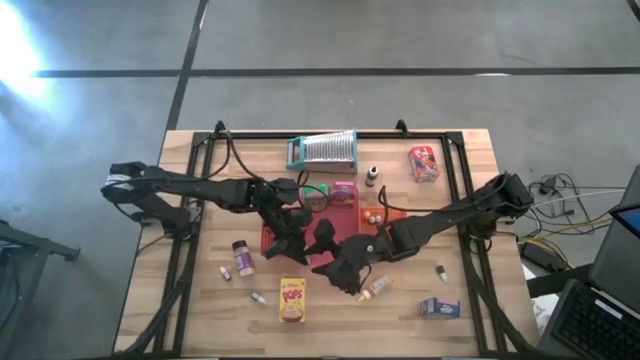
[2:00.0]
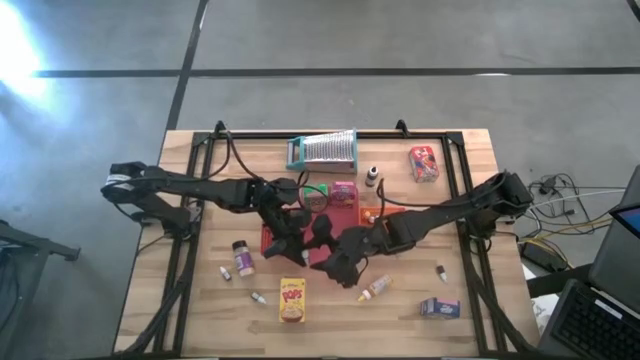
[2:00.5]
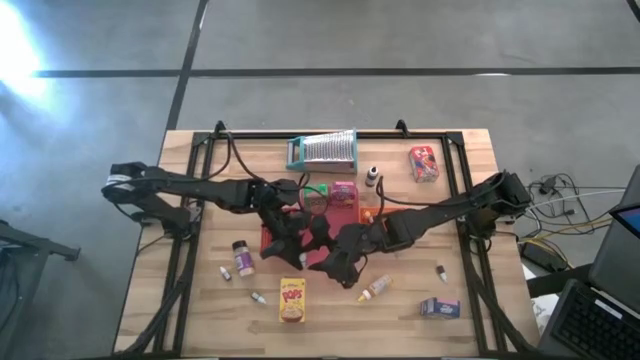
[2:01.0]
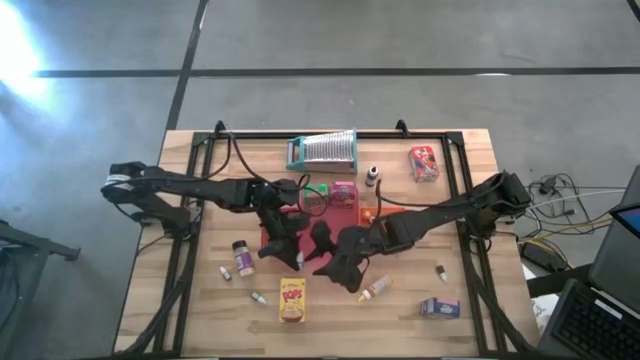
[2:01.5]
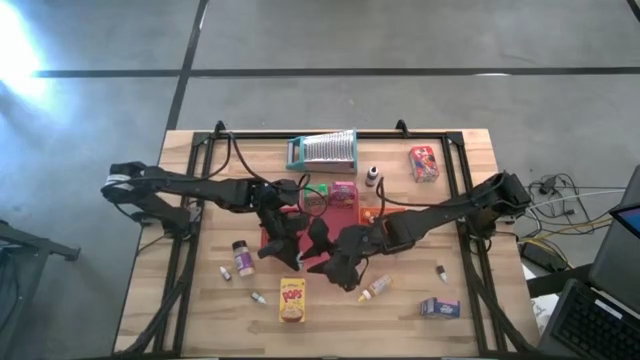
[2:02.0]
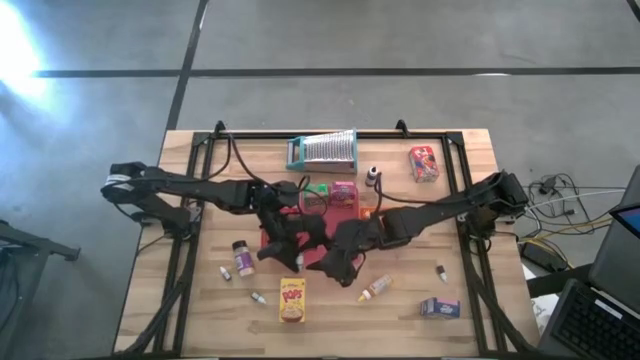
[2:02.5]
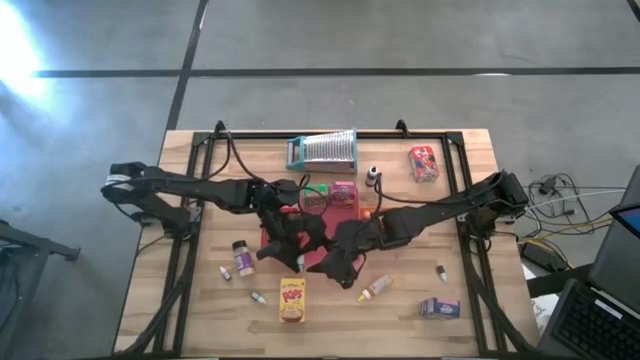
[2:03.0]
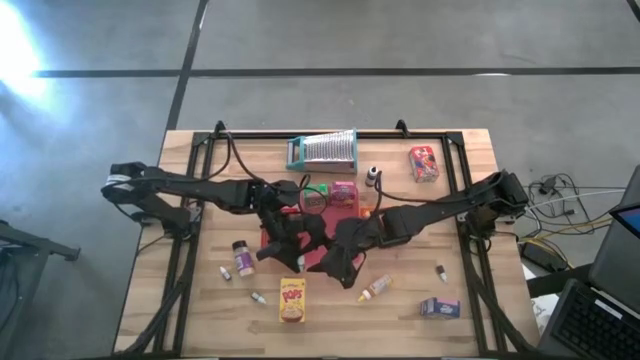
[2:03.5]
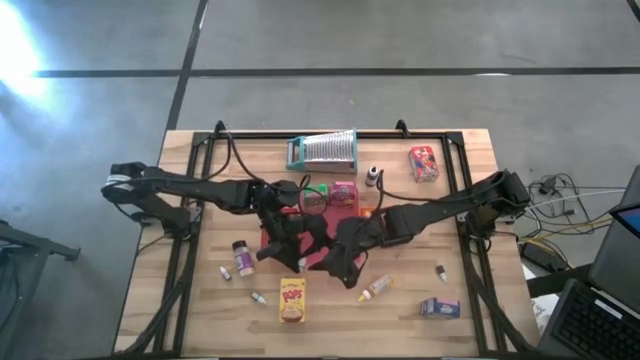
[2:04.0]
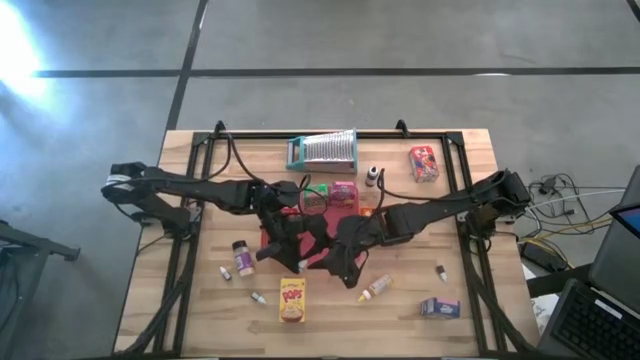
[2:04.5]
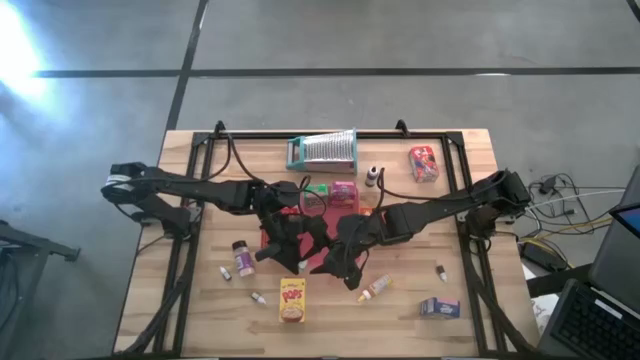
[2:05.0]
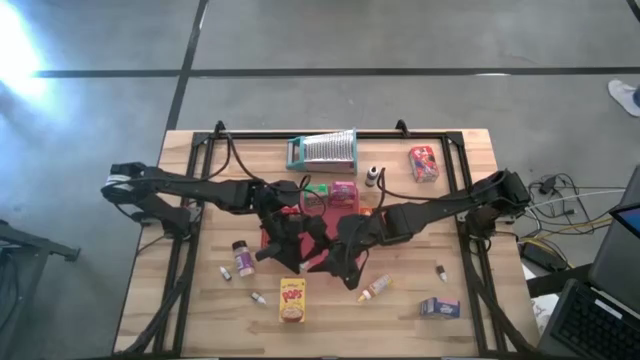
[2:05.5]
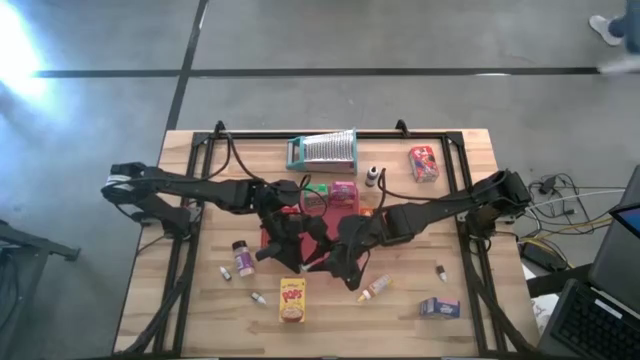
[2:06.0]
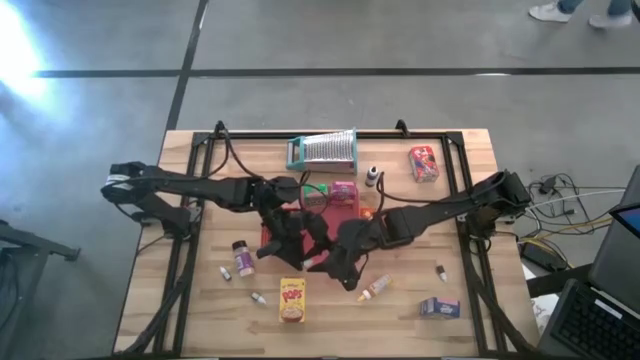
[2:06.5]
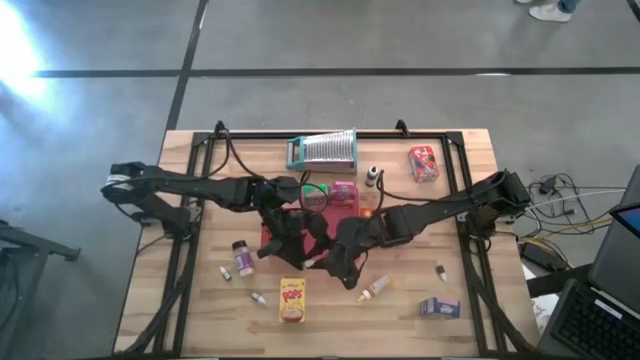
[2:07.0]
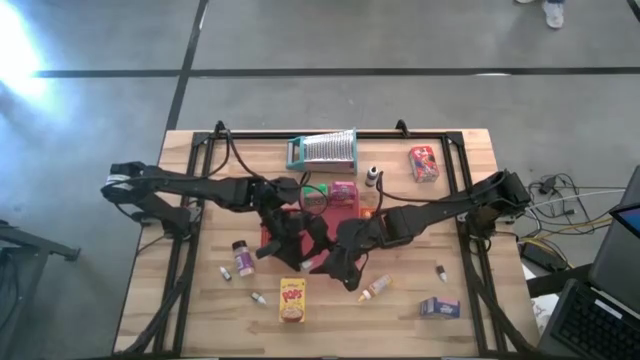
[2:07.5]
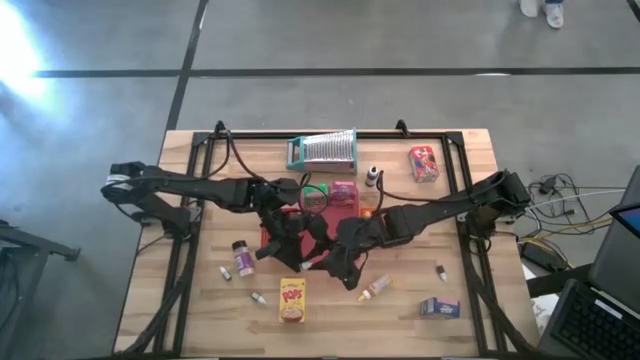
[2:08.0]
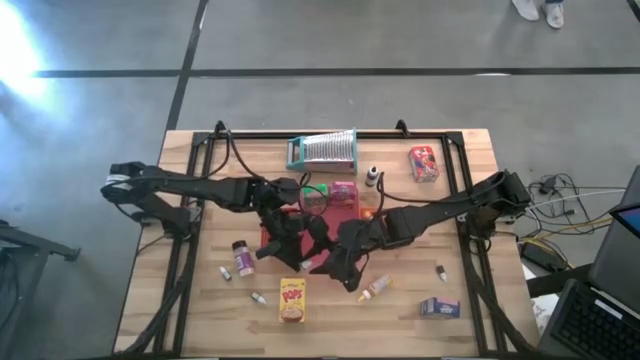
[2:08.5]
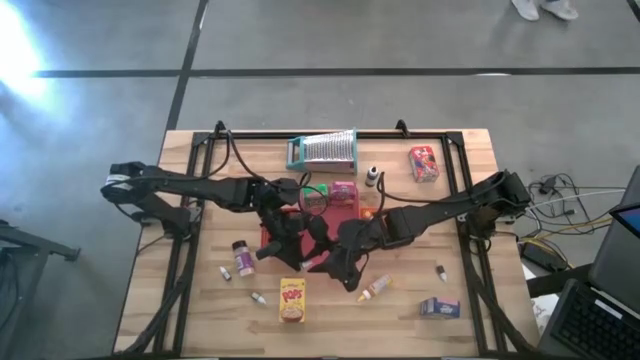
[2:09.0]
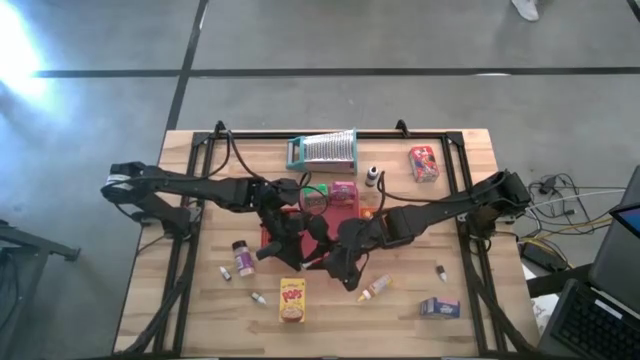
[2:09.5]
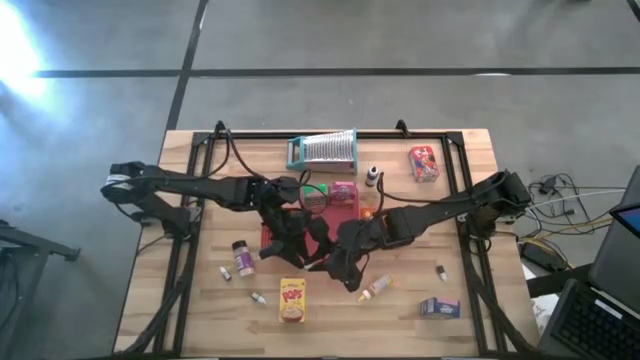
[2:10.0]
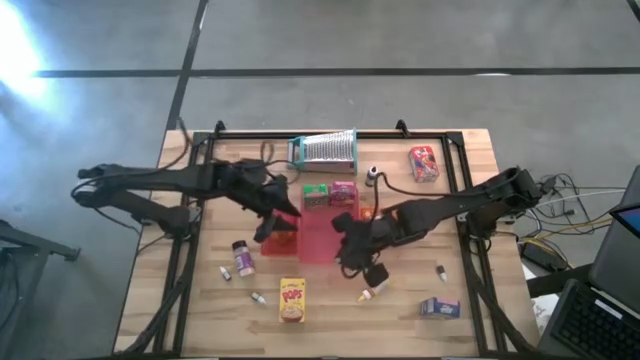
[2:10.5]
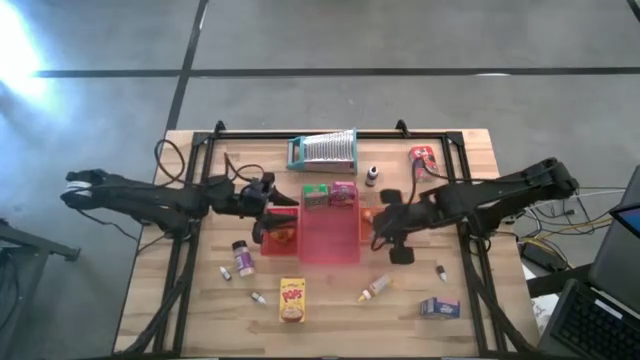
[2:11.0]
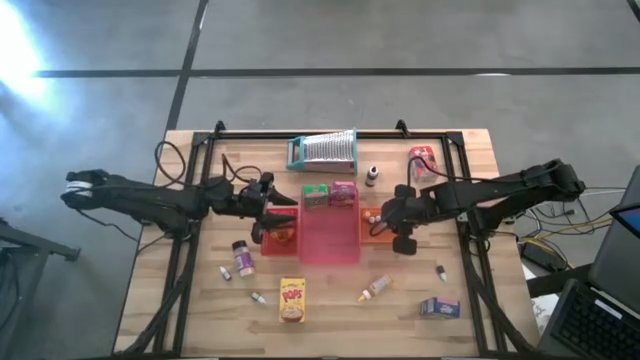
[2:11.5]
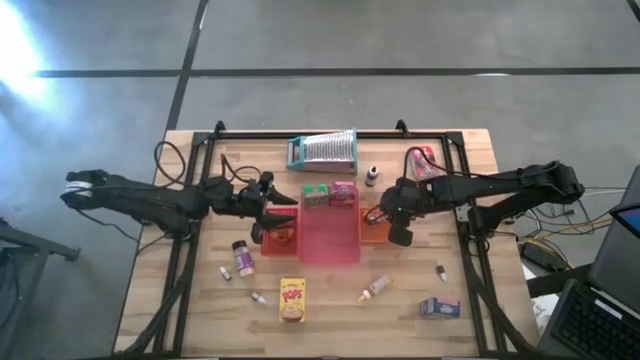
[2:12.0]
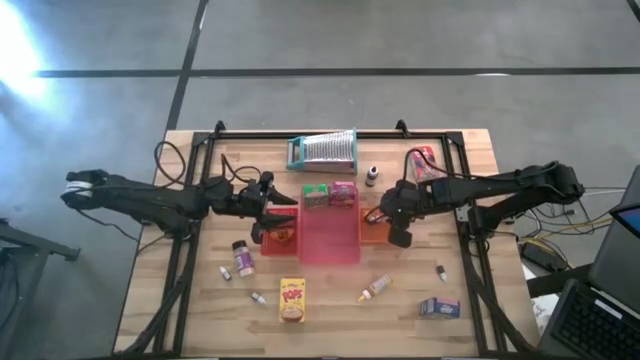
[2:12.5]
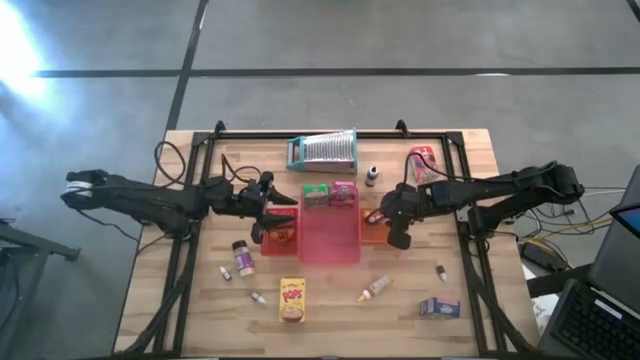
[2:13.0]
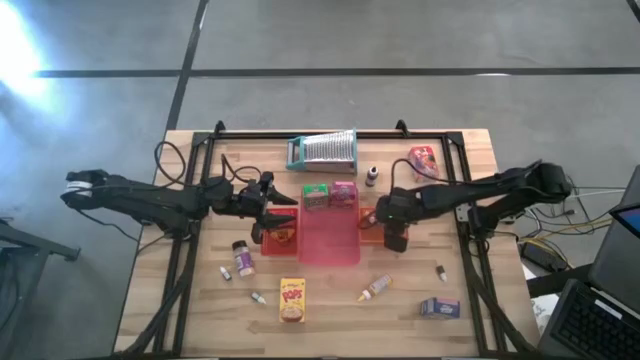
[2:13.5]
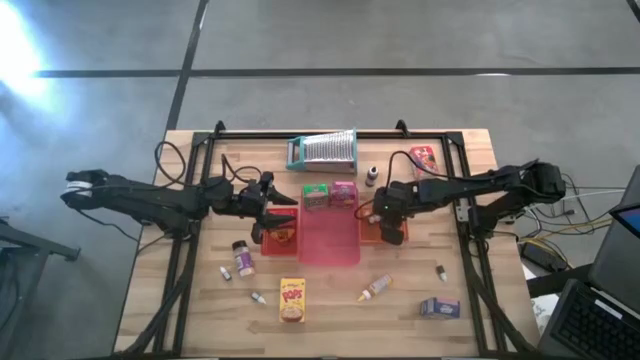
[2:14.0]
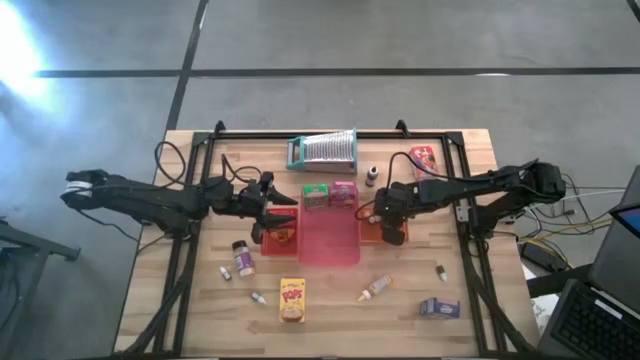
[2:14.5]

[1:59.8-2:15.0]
Task: Pick & Place Kitchen Items
Put the small orange food coloring bottle into the orange bin

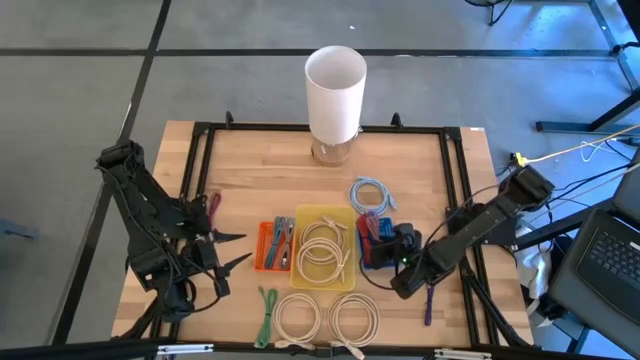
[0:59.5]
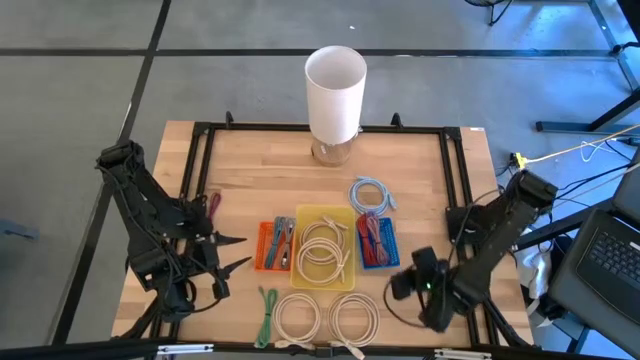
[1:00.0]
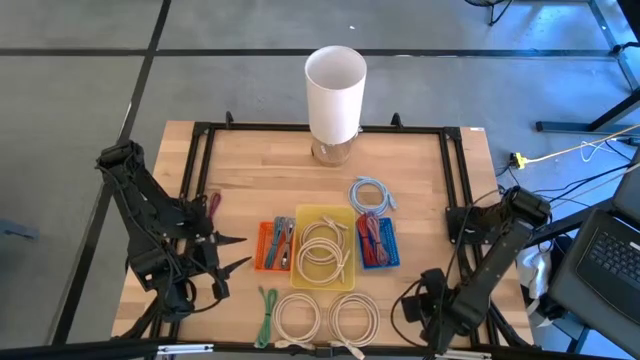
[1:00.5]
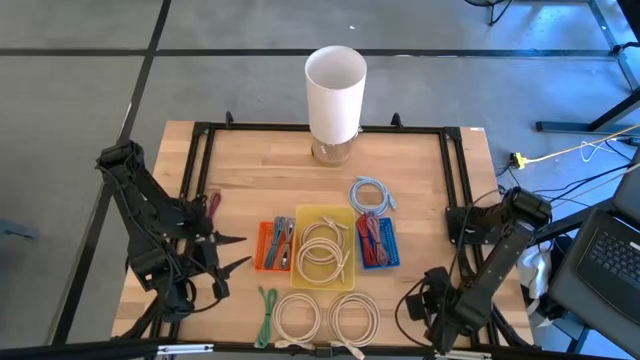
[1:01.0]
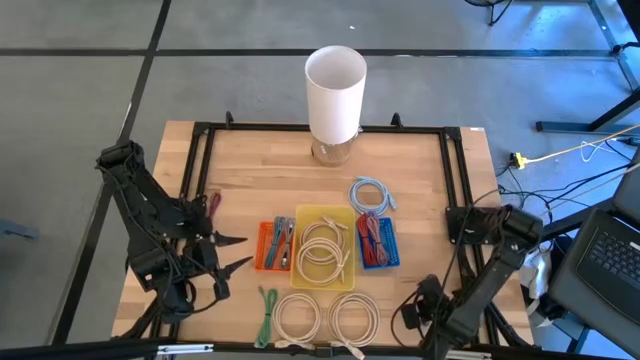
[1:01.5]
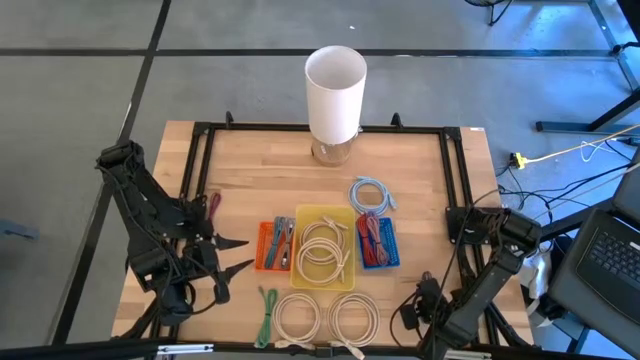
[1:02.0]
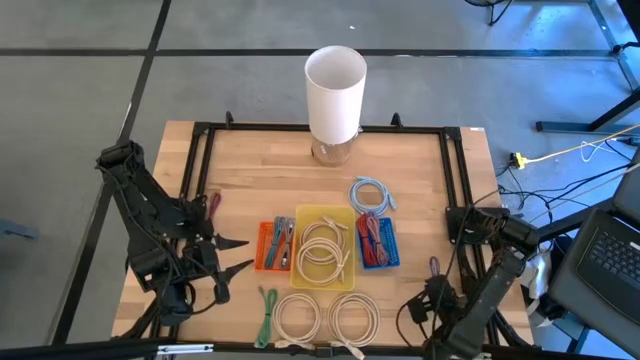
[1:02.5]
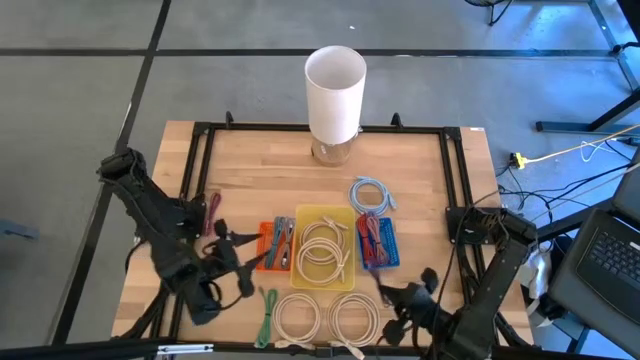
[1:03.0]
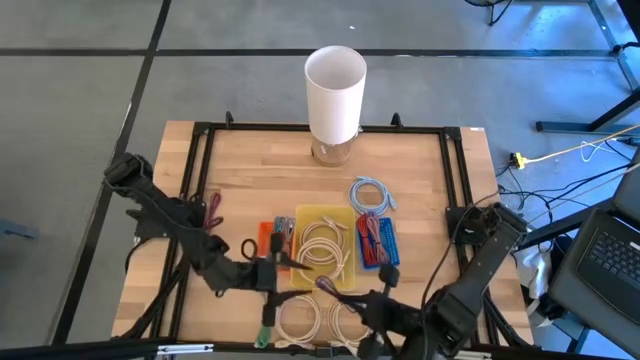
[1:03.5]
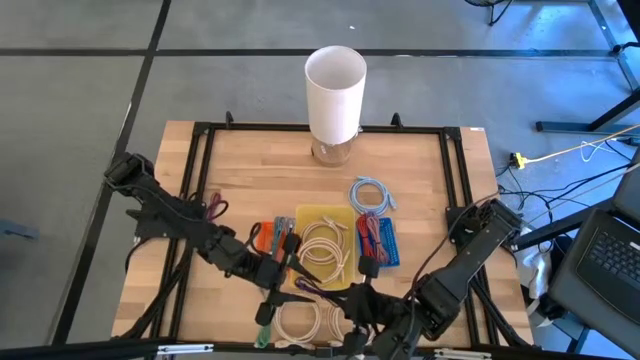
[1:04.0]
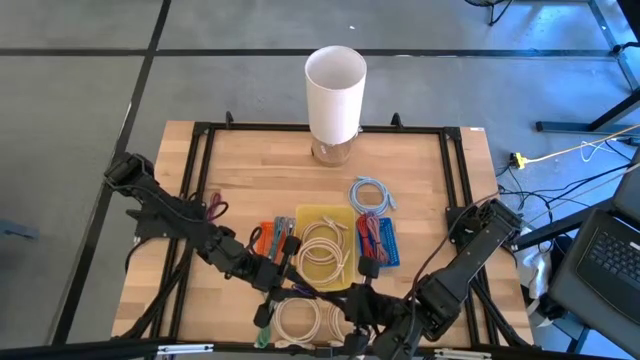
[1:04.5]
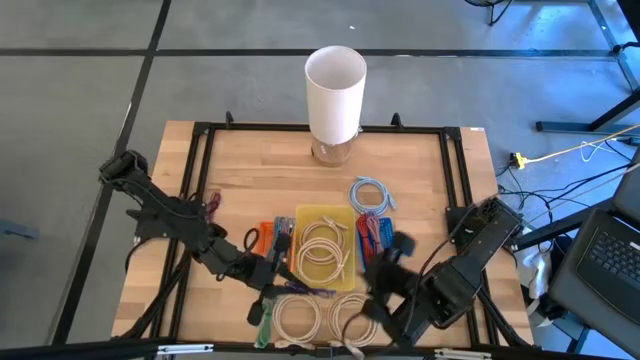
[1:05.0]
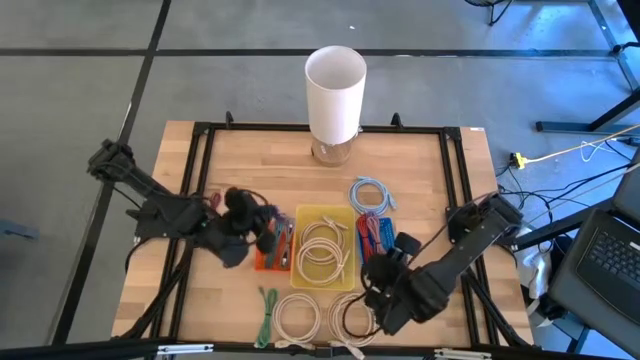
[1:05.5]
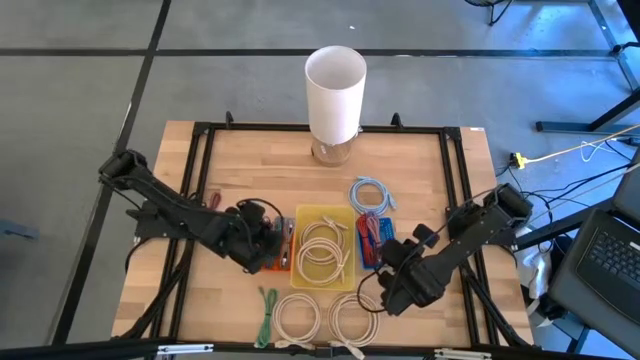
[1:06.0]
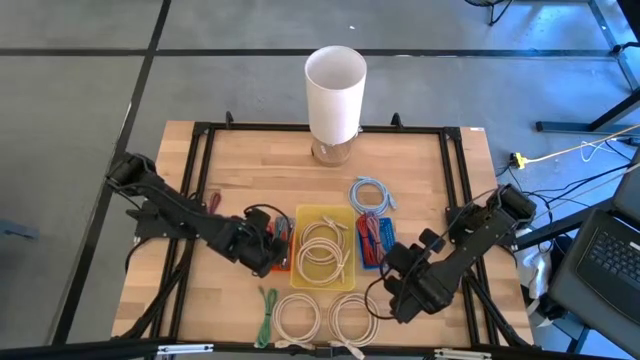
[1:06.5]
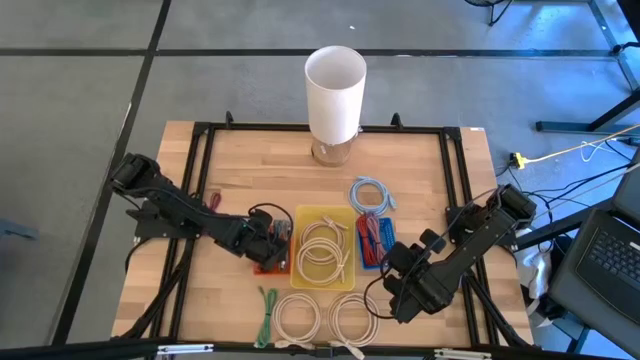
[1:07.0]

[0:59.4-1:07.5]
Task: Pick & Place USB Port
Put the black and violet charger cable into the orange bin
